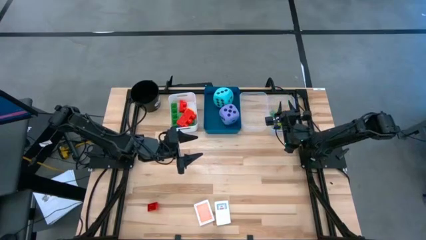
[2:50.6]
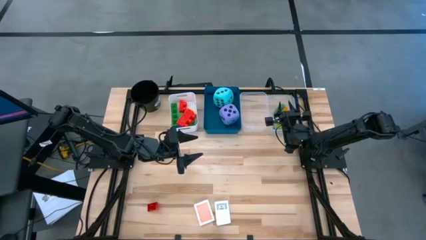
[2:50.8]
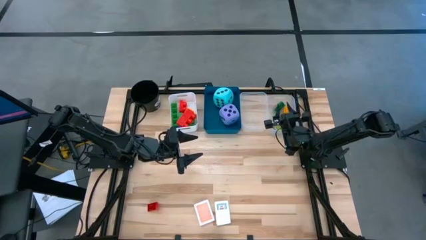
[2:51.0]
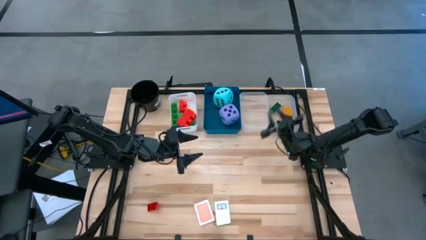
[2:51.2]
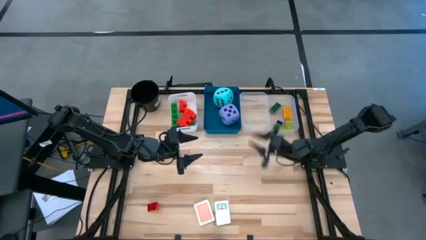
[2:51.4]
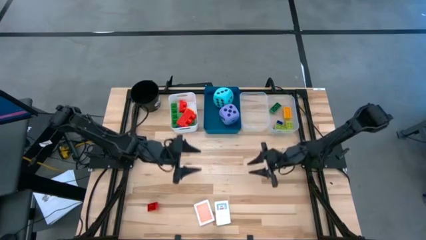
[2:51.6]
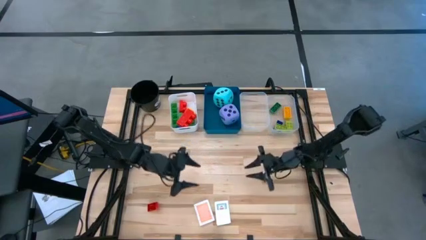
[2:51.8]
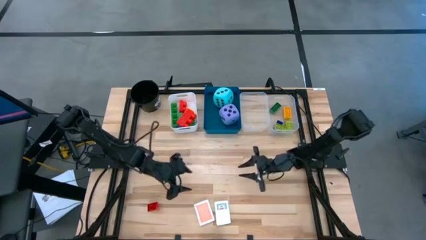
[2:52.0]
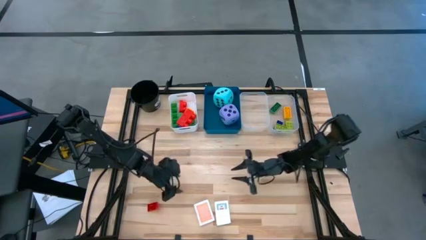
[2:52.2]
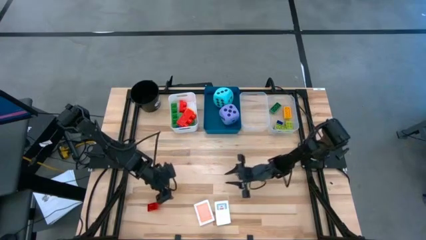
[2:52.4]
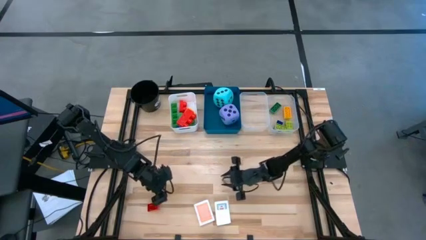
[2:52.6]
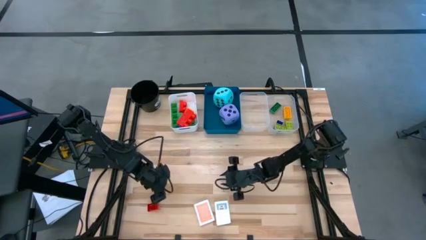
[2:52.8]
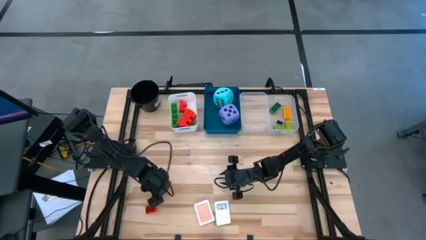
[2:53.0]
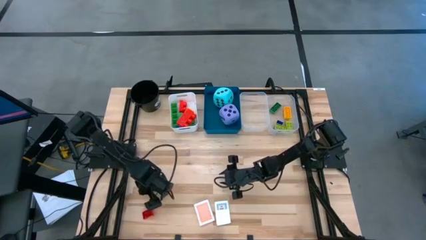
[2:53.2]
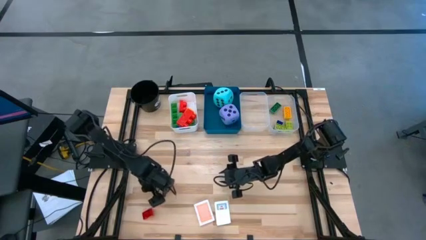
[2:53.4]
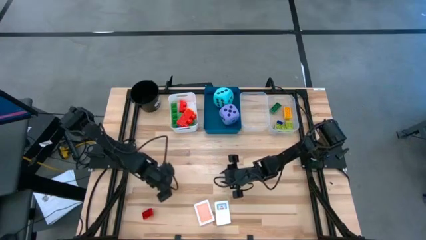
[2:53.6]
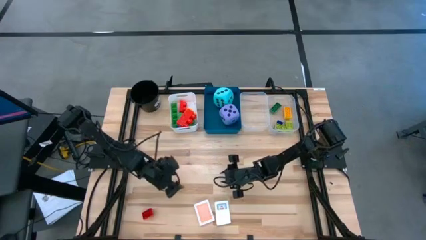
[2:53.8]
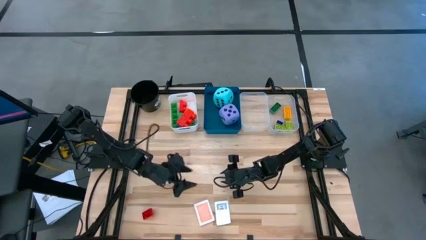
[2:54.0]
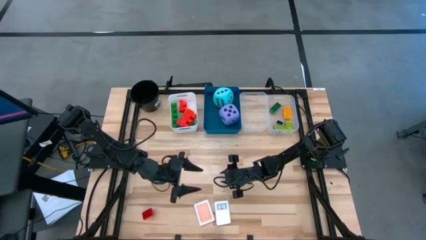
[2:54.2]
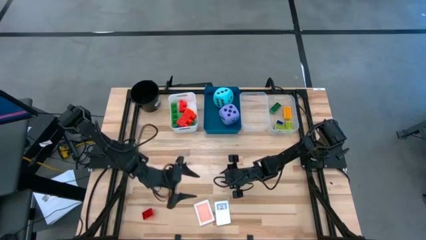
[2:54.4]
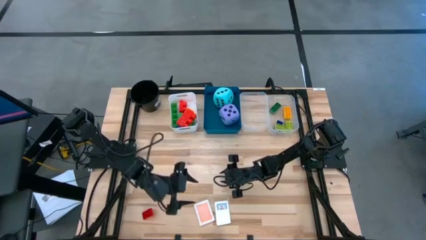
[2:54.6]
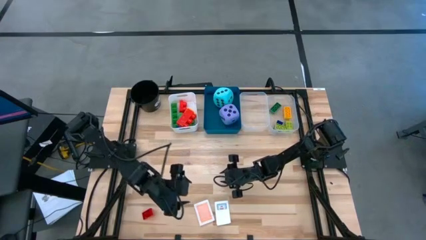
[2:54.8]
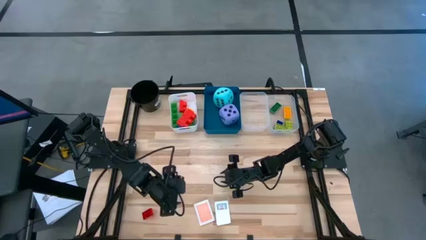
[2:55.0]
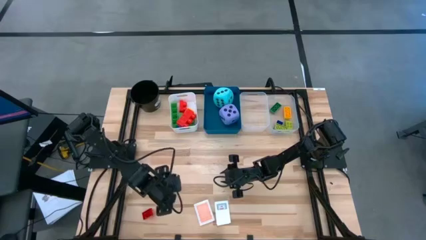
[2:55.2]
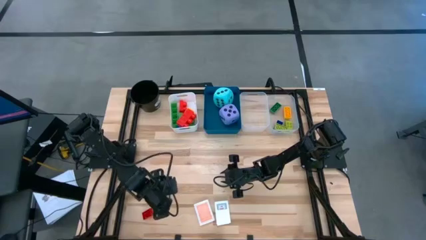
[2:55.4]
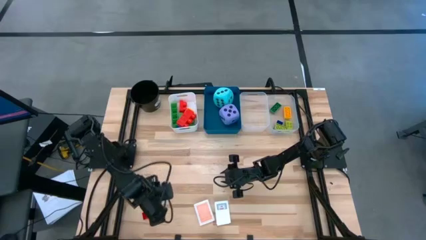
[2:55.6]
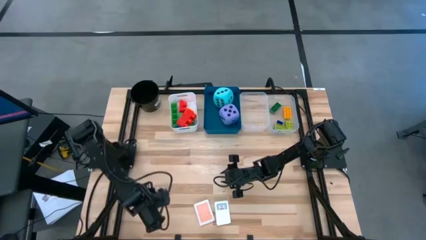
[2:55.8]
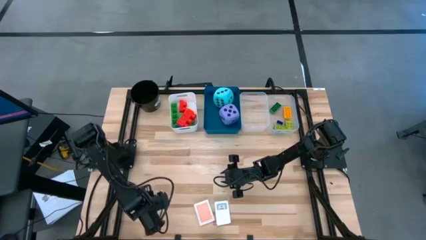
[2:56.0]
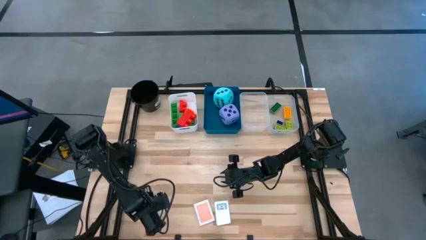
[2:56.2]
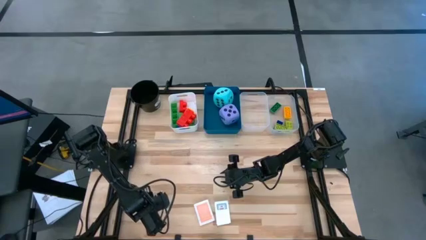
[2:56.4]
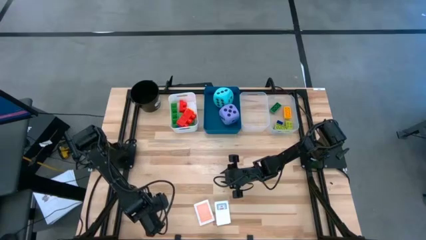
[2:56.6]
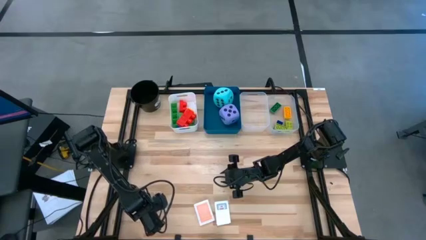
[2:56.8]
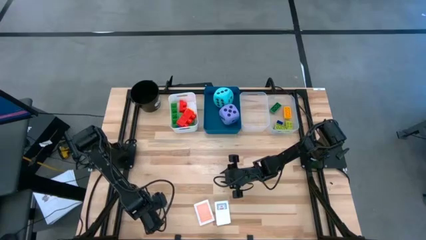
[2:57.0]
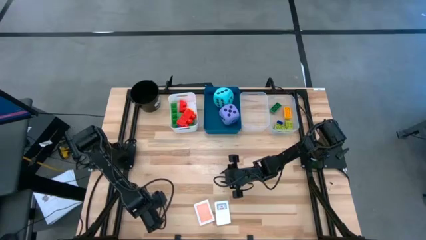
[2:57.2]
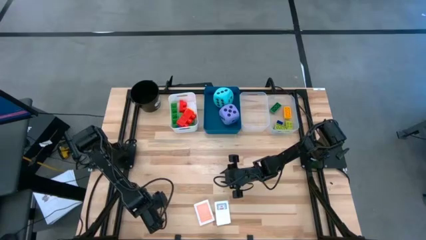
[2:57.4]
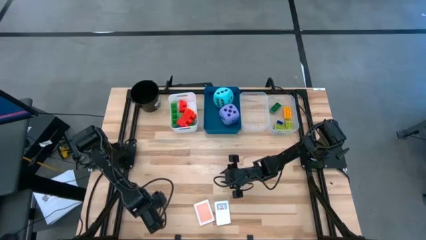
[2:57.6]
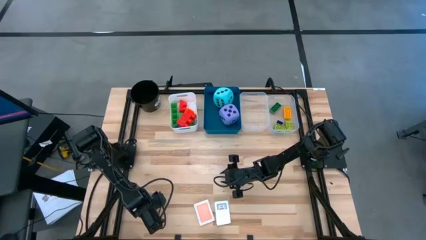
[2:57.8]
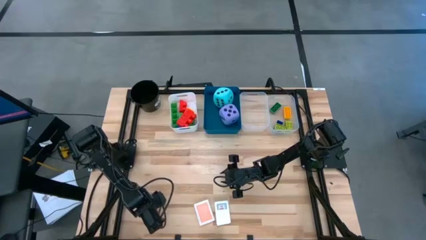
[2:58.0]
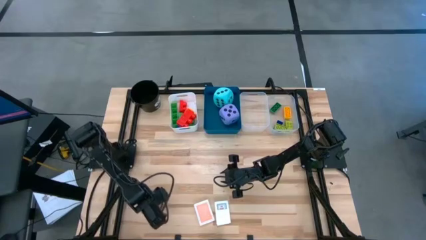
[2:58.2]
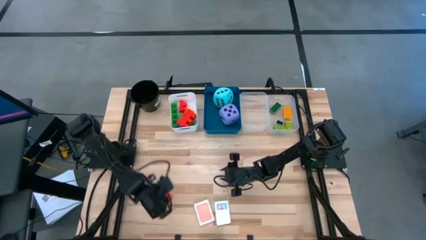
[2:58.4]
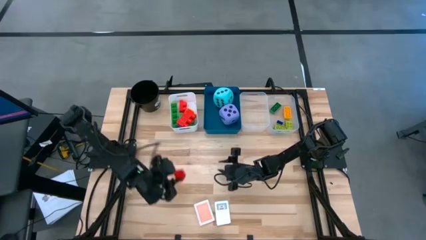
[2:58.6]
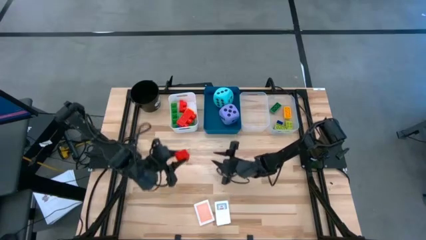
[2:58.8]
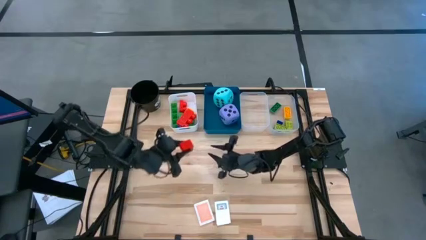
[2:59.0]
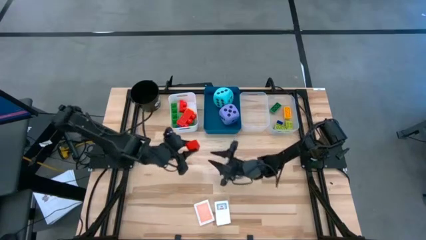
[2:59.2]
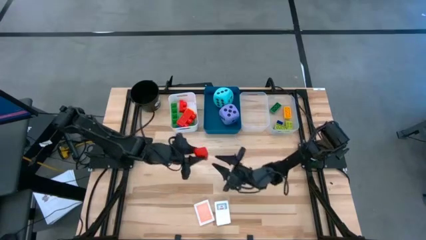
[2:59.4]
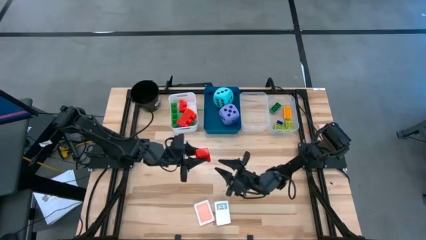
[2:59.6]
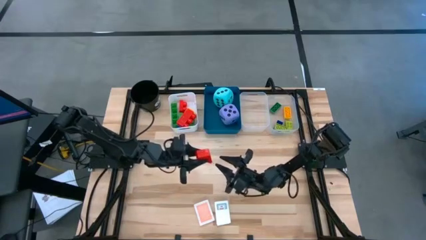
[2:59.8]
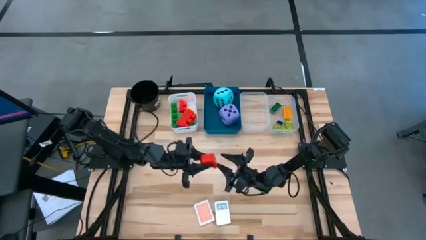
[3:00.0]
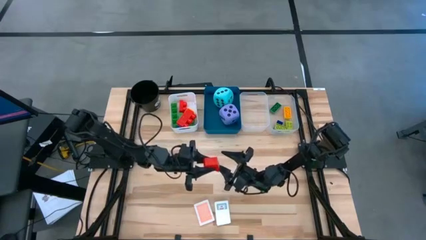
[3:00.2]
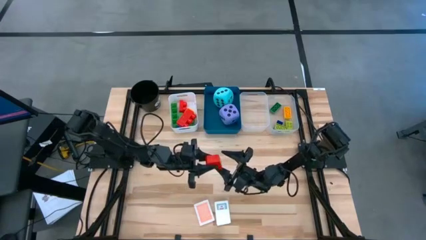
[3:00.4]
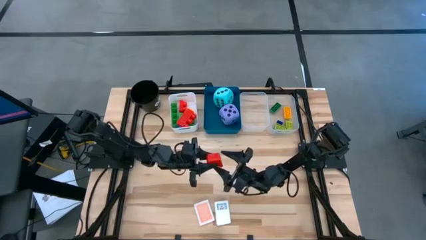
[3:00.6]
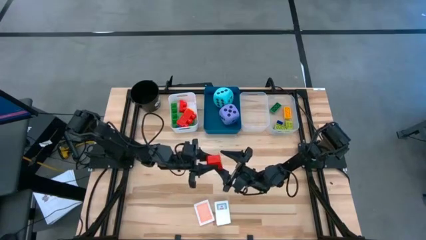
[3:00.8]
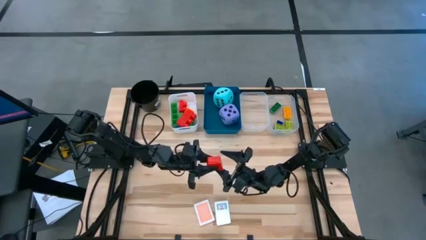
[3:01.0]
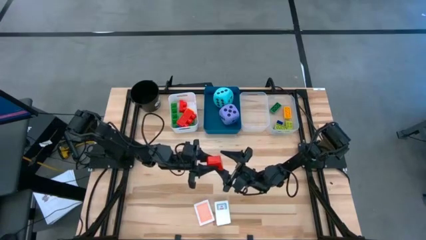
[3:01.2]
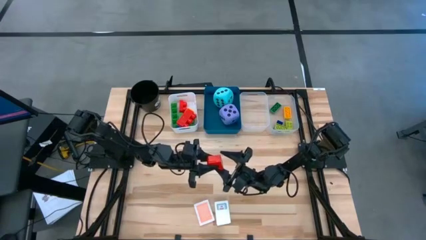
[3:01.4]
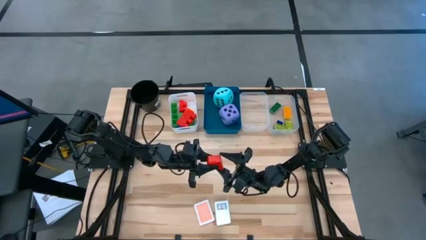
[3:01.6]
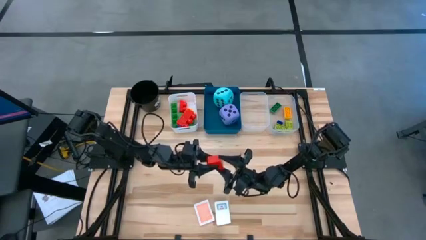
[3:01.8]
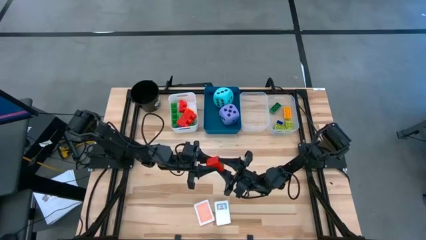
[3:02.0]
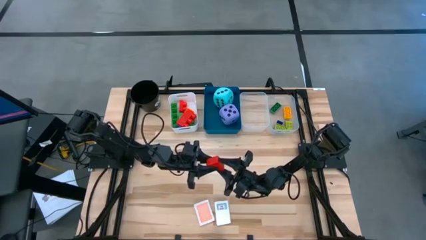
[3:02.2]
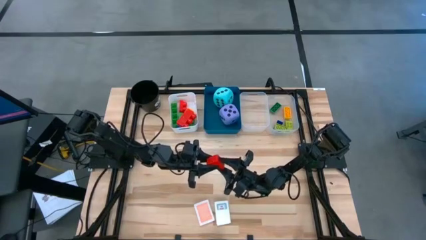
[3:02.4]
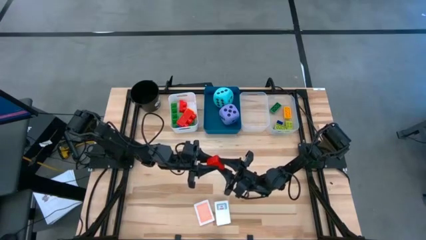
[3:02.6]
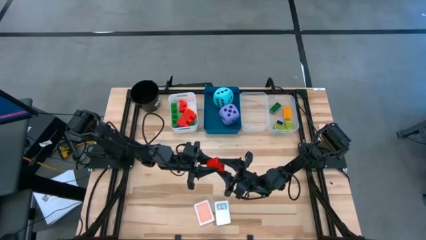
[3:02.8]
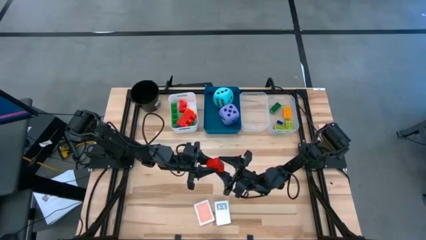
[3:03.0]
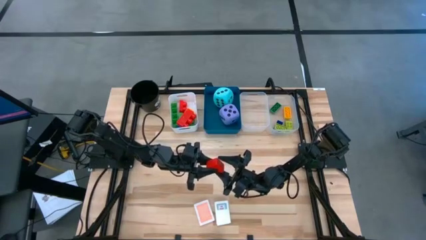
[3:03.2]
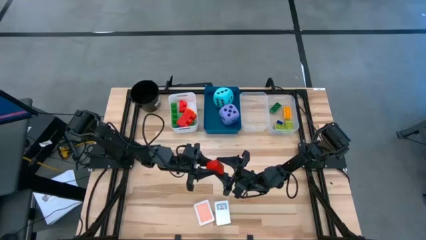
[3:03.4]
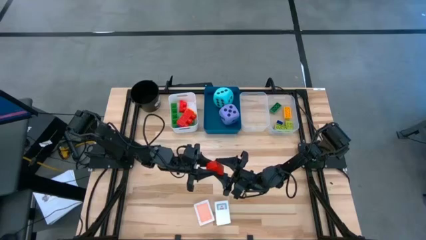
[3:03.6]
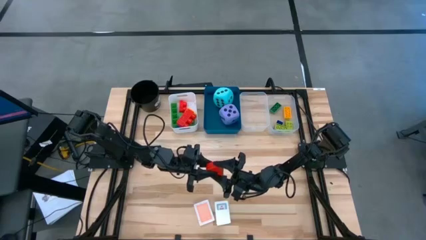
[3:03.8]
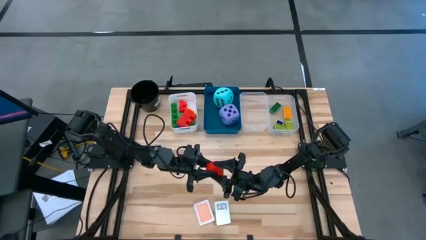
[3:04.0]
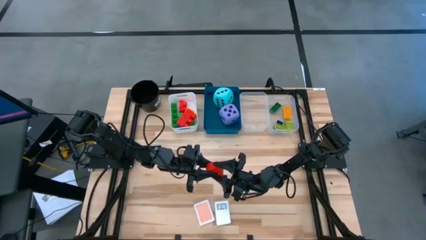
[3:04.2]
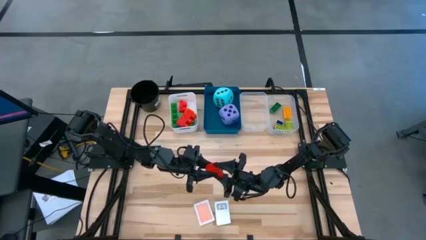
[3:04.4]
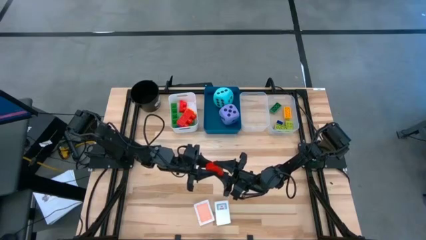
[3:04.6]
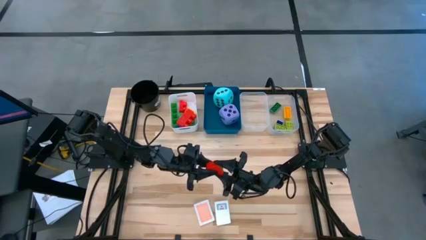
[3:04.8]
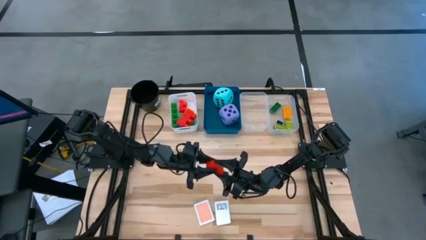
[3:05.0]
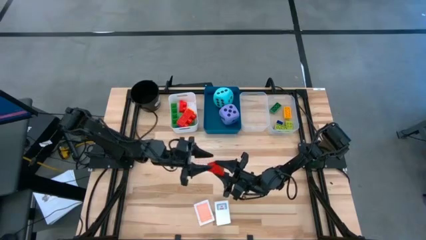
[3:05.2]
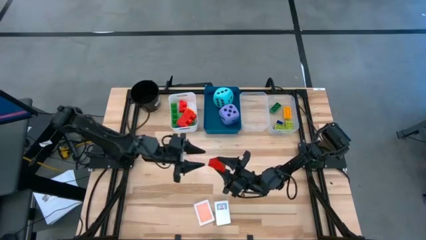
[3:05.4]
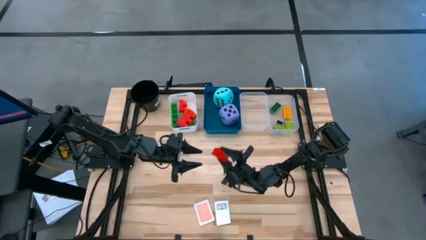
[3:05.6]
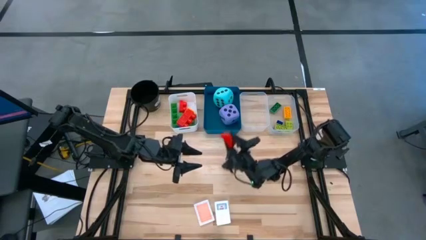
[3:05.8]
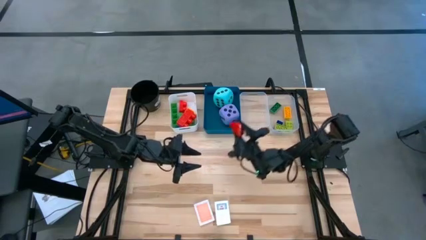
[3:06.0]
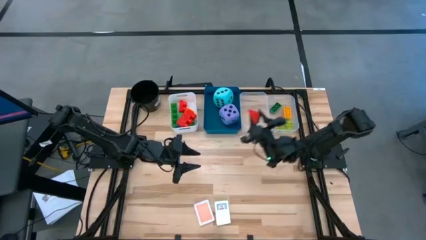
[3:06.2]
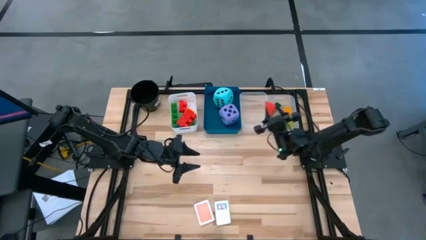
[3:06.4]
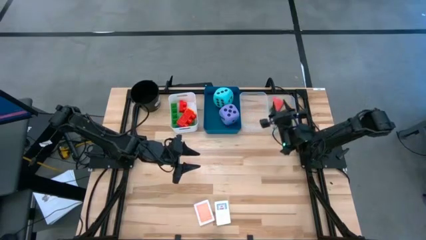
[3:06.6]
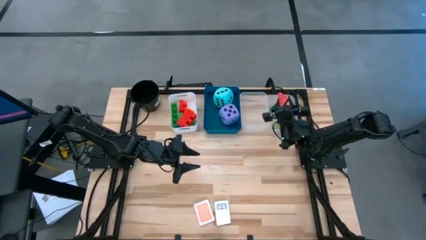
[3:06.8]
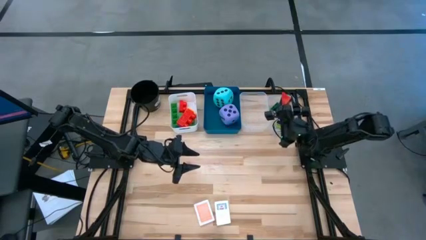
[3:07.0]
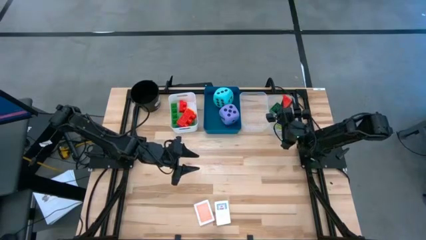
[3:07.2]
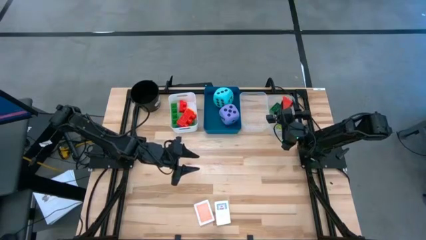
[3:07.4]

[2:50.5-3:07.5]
Task: Pick & Place Toys
Put the small red game piece into the right transparent bin
